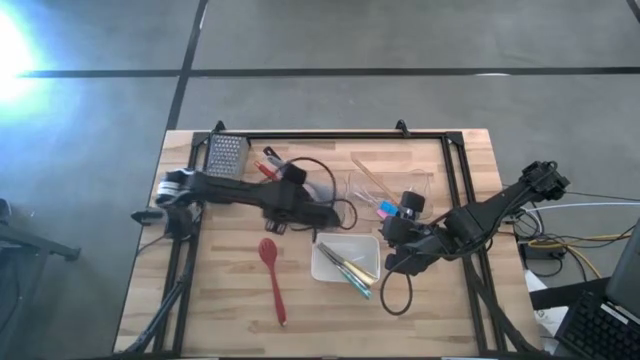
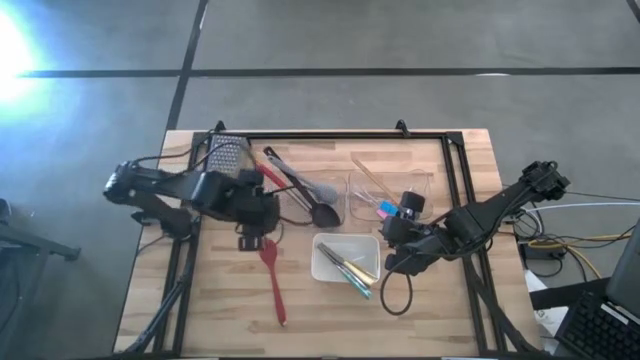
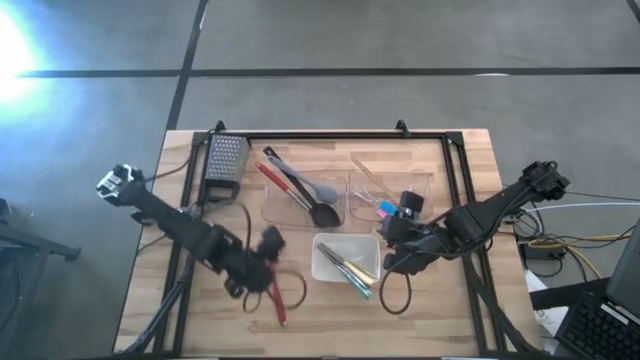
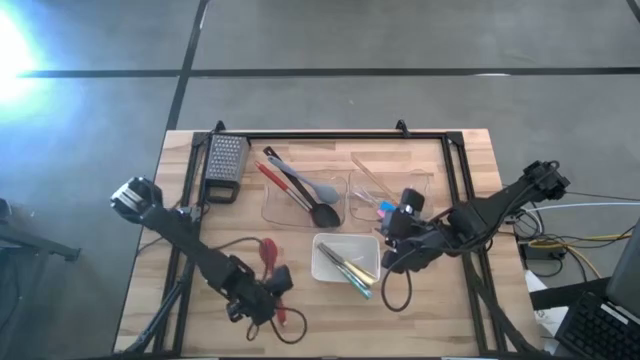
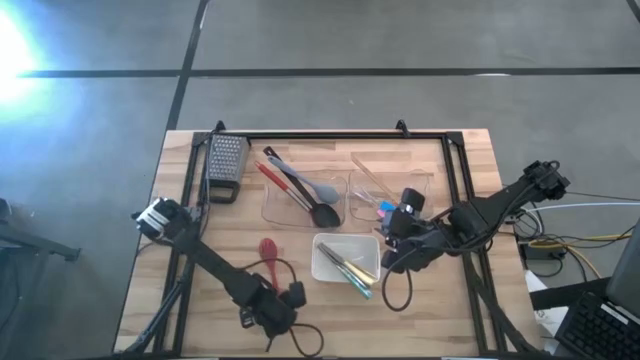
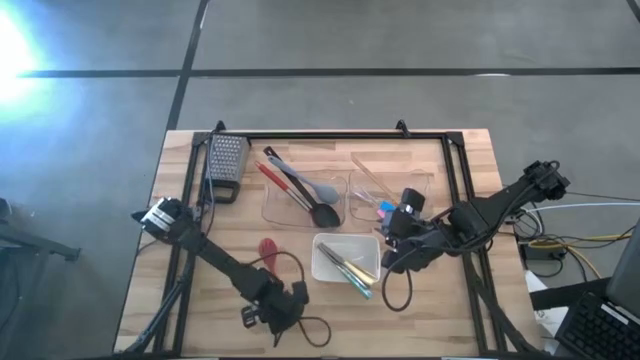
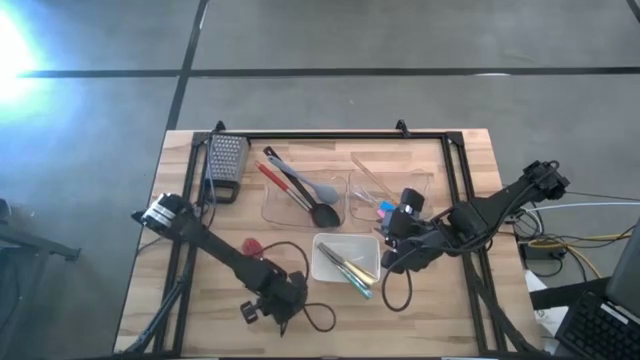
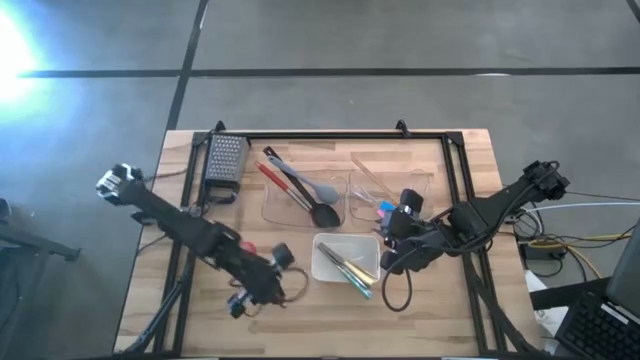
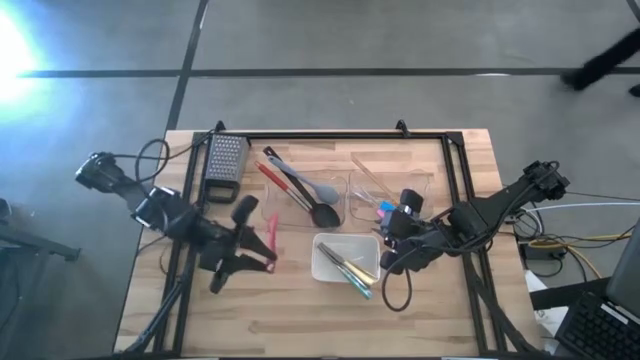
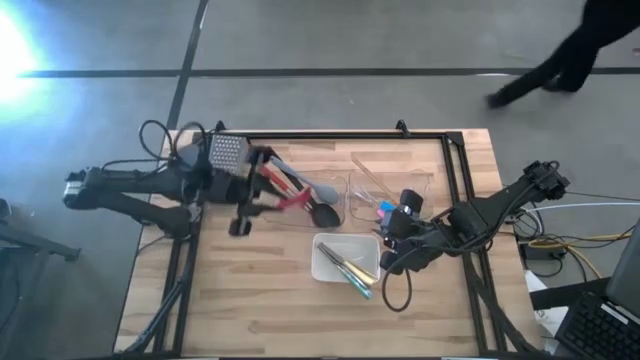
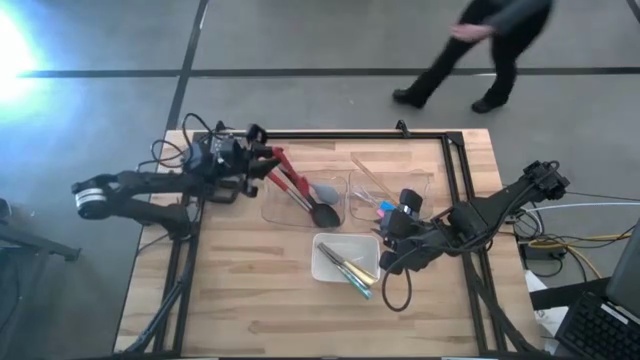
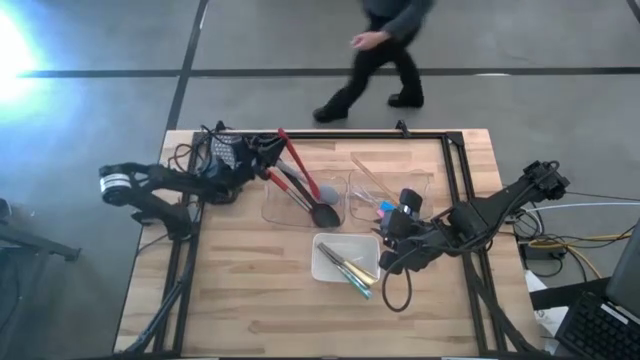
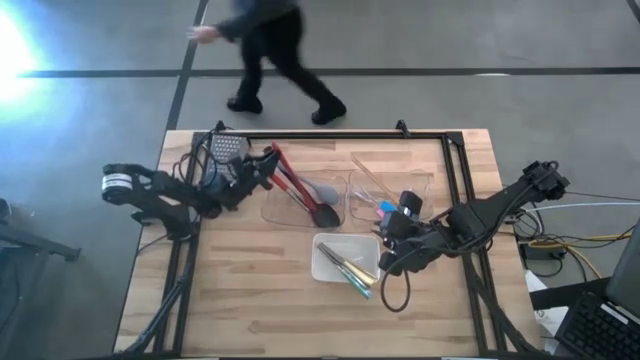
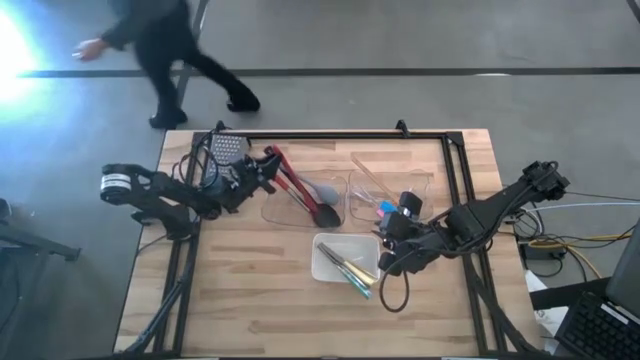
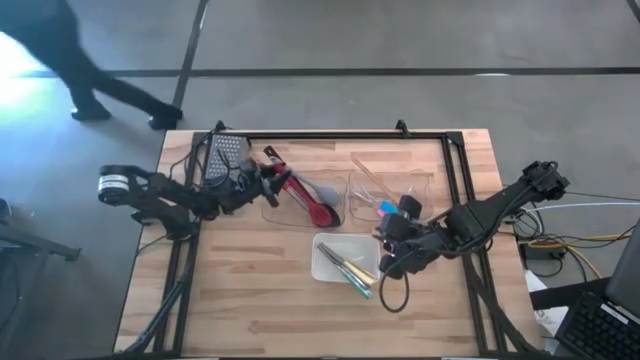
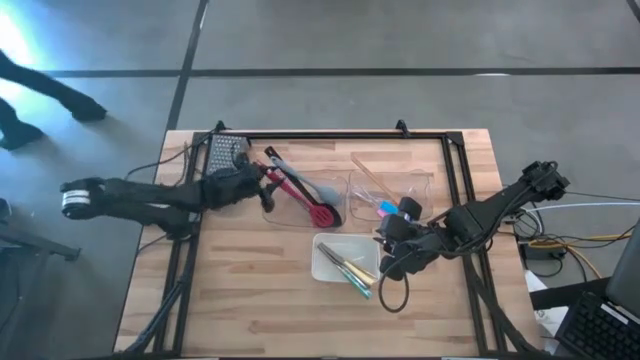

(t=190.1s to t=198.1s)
Task: Pick & Place Kitchen Items
Put the red serving spoon into the left transparent bin

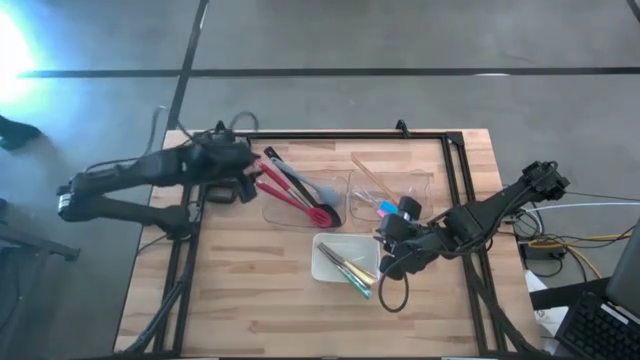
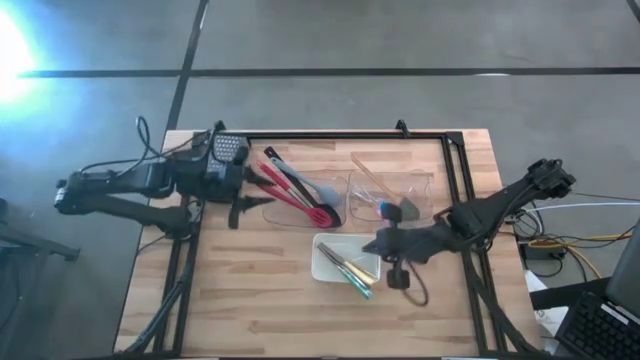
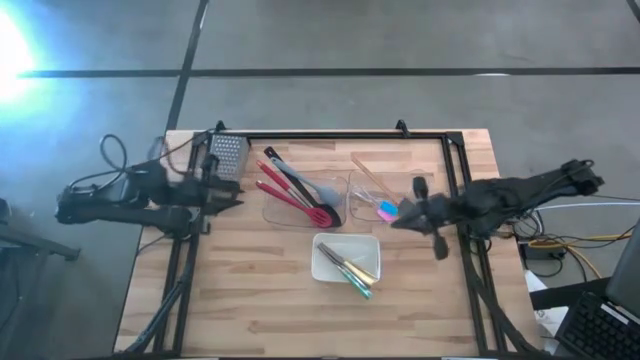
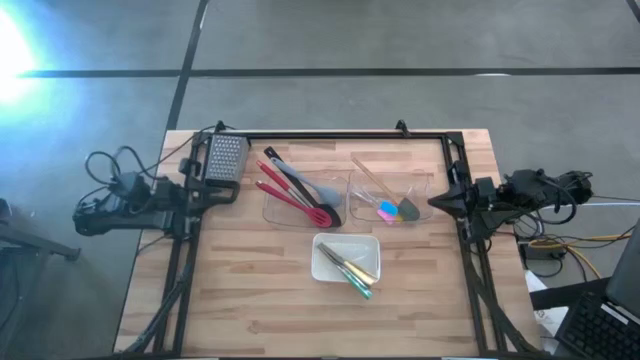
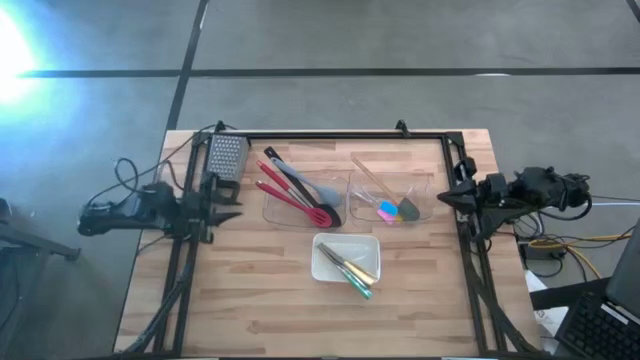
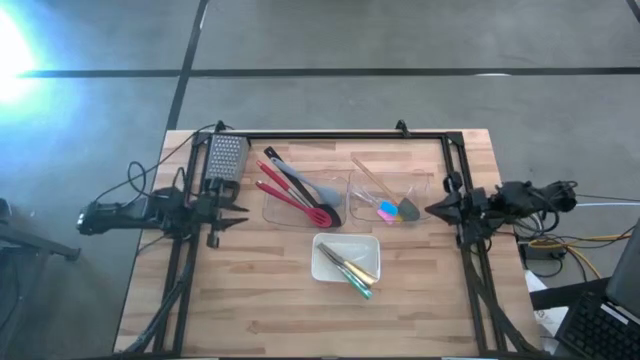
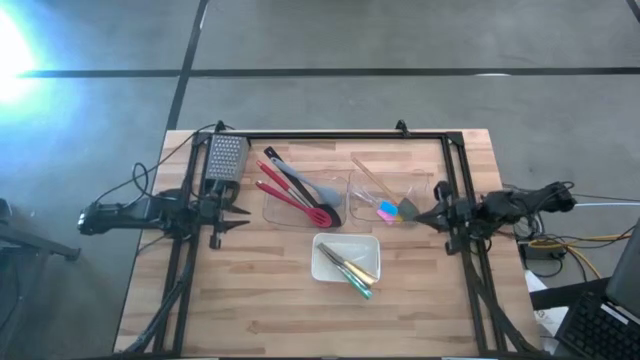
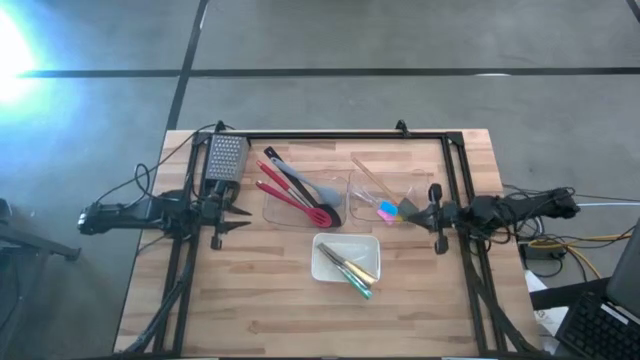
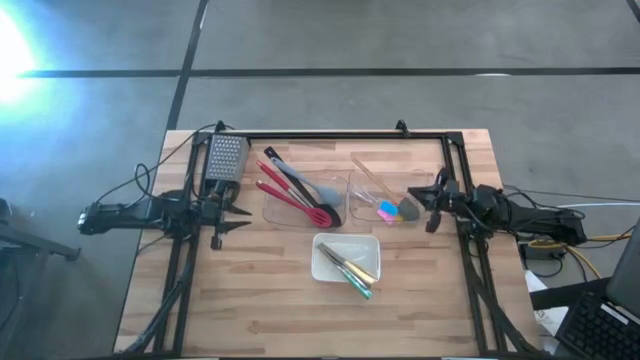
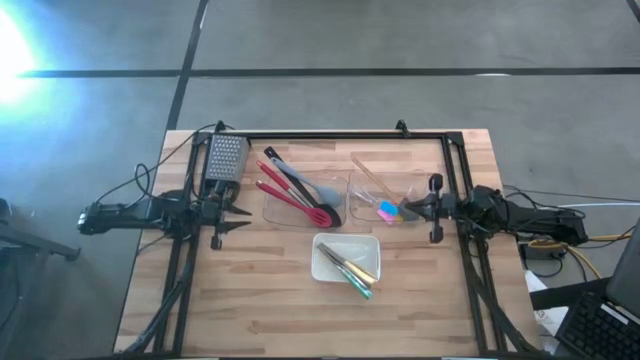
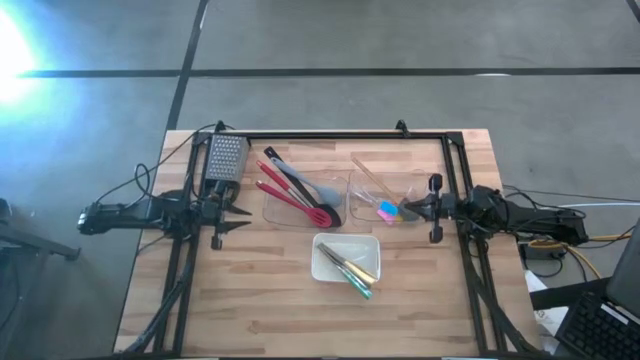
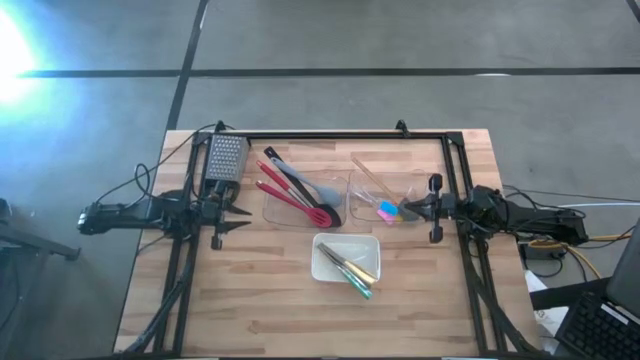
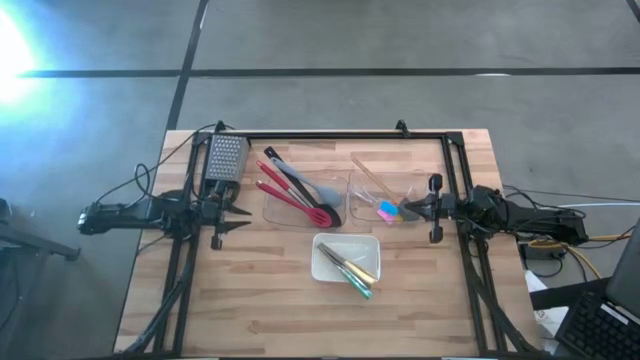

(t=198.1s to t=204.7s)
Return to Home Position

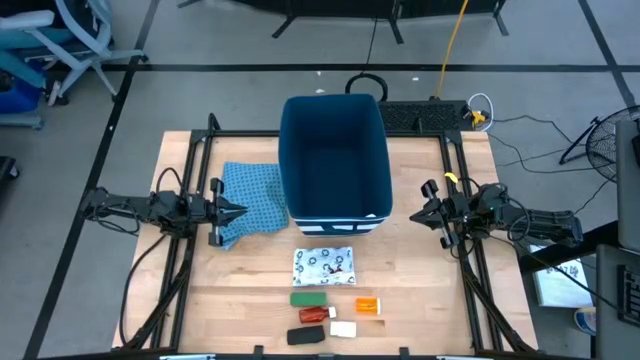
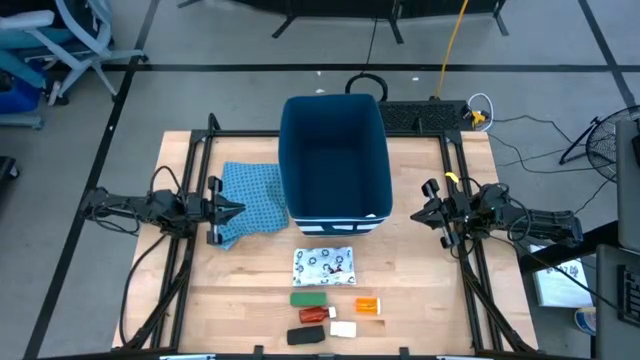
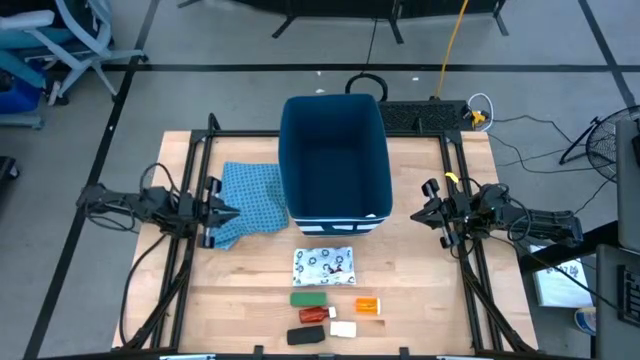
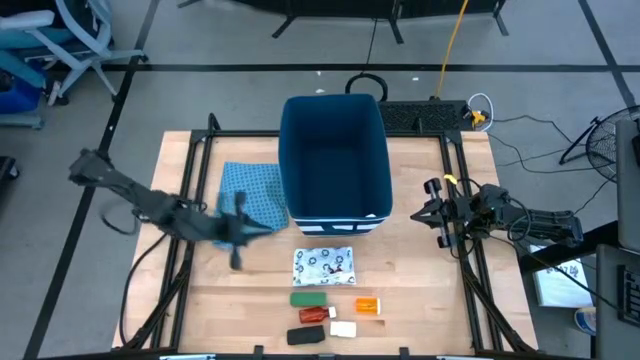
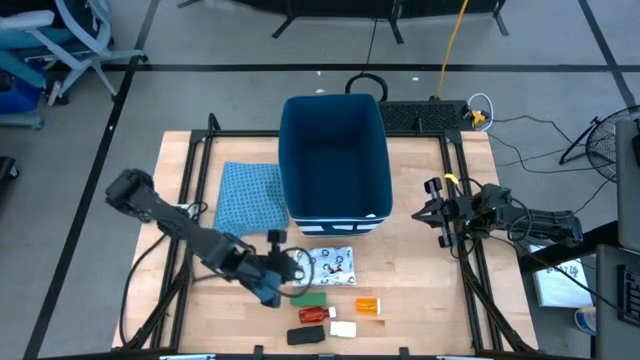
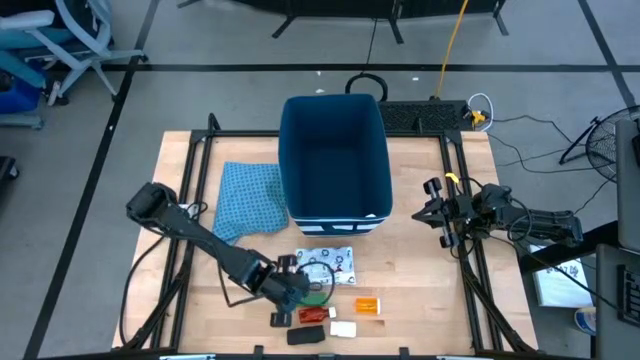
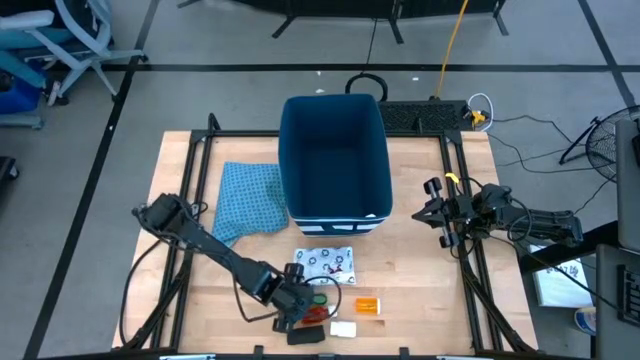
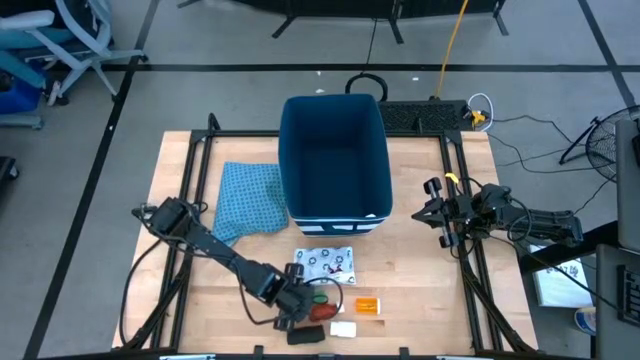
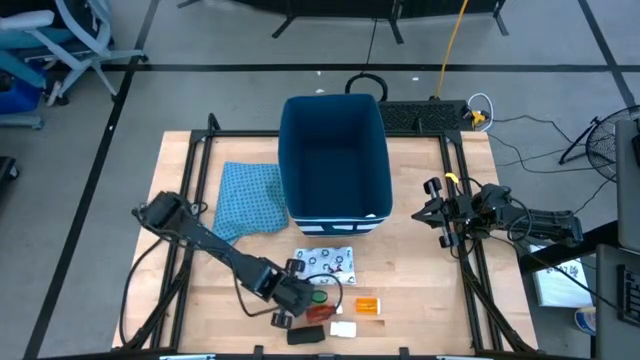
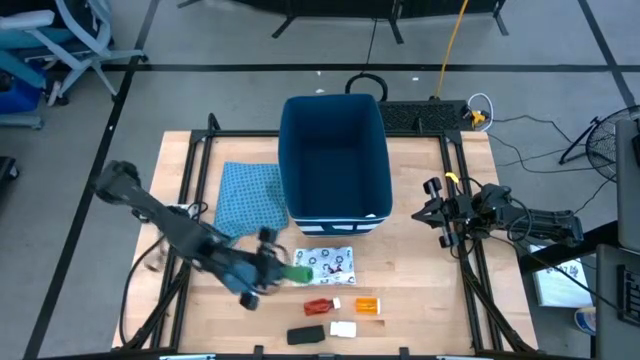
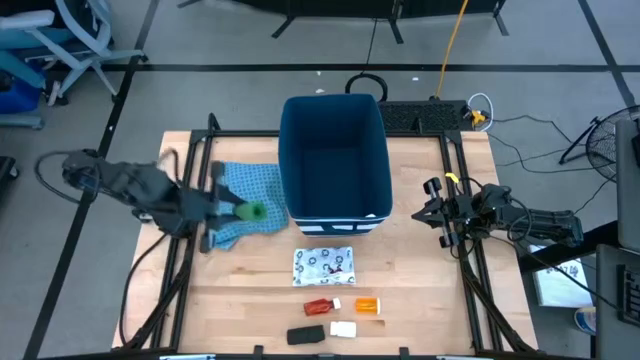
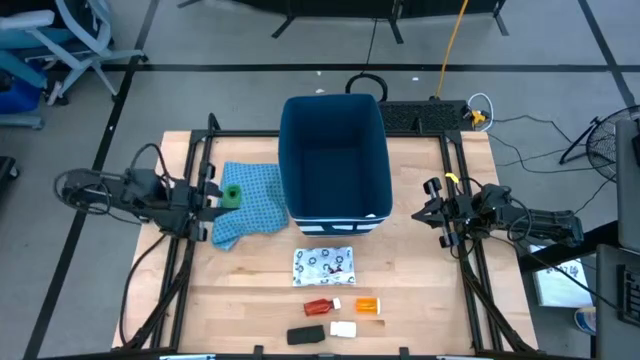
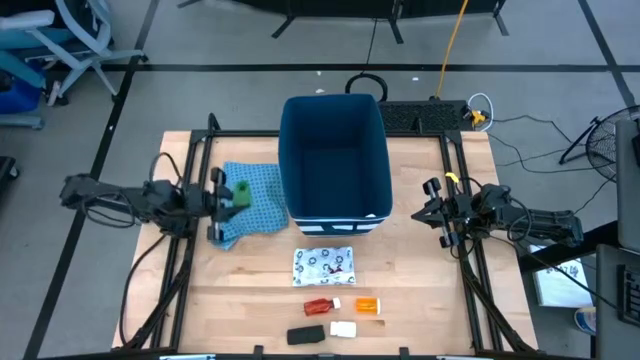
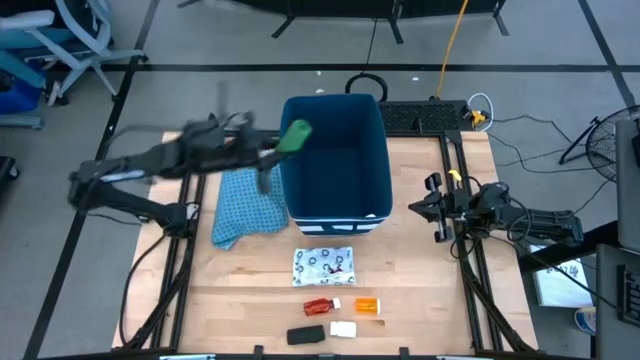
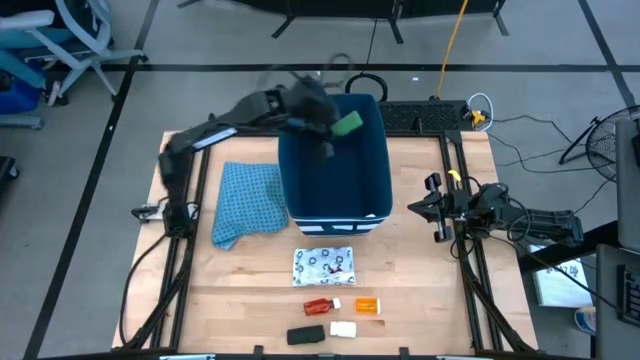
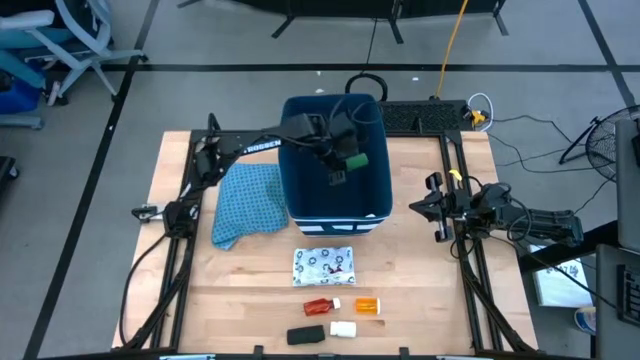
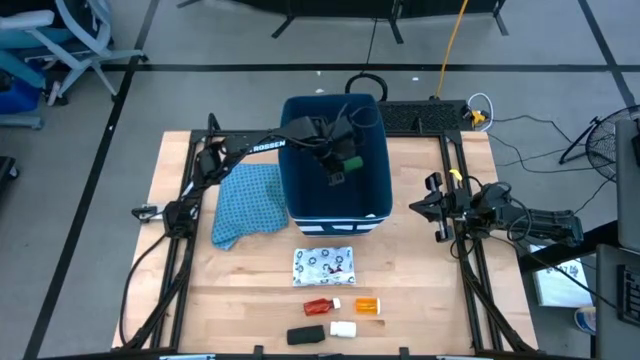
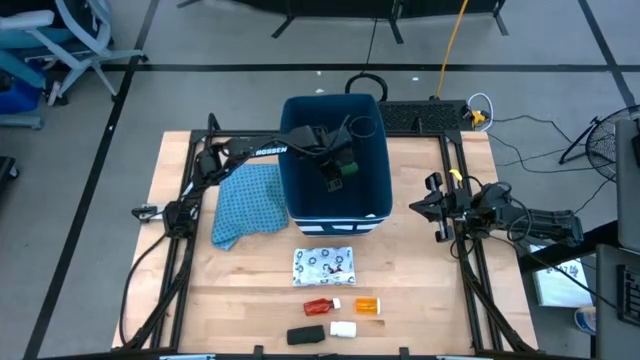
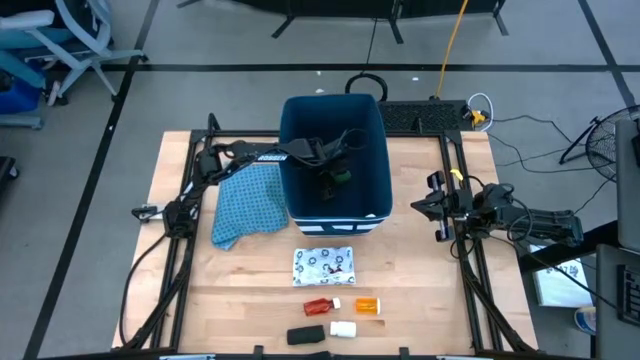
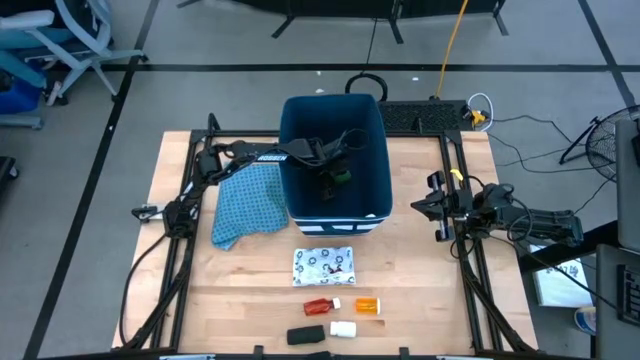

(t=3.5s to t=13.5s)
Task: Pick & place medical supplies in basket/bin
Put the green bandage into the blue bin
